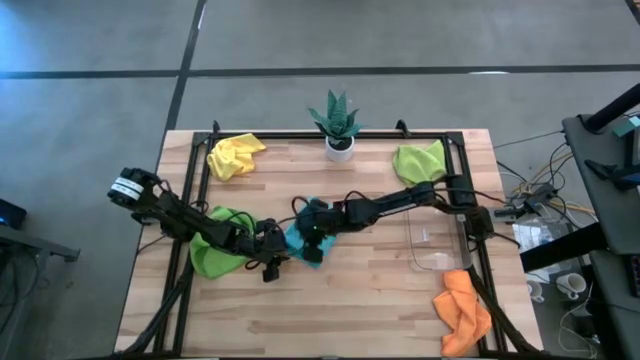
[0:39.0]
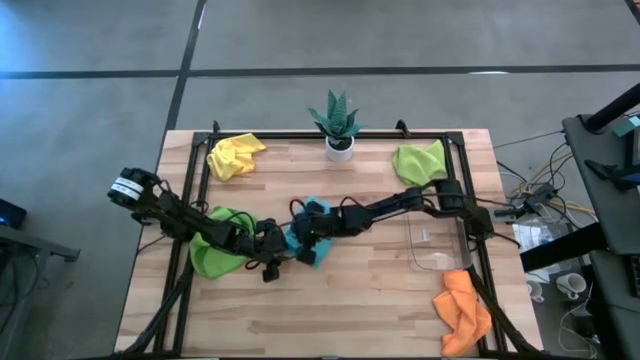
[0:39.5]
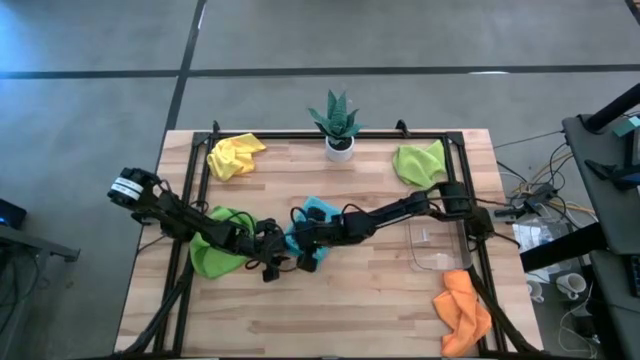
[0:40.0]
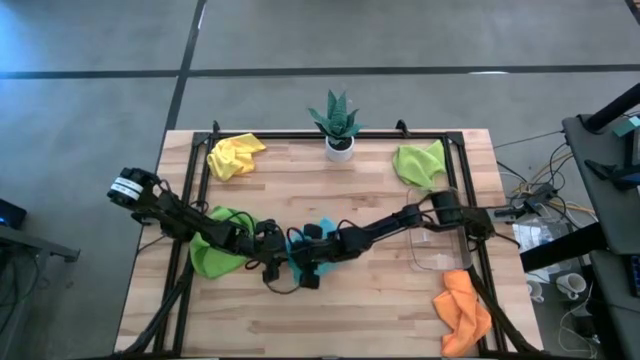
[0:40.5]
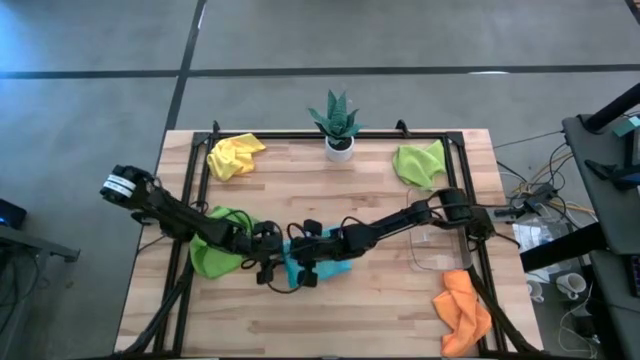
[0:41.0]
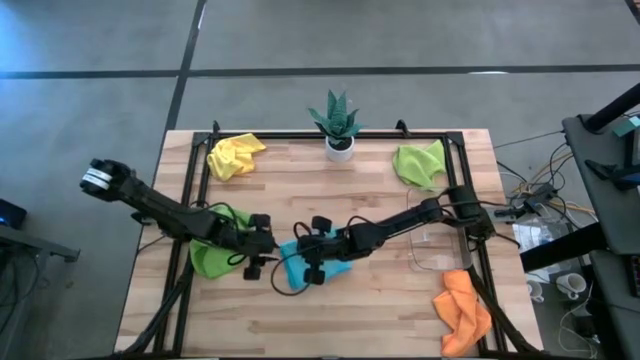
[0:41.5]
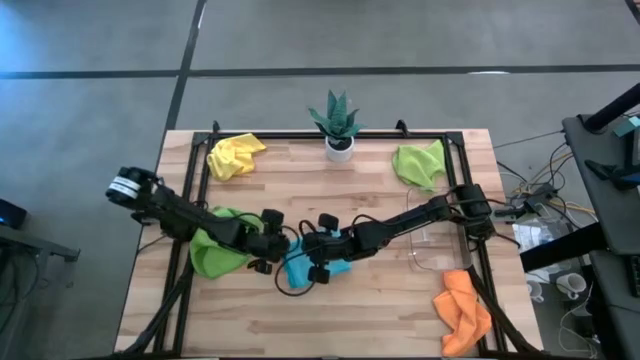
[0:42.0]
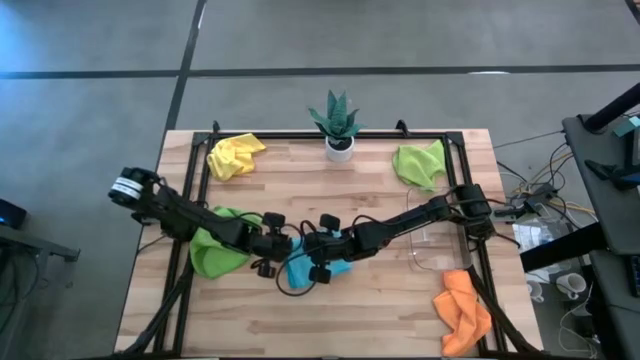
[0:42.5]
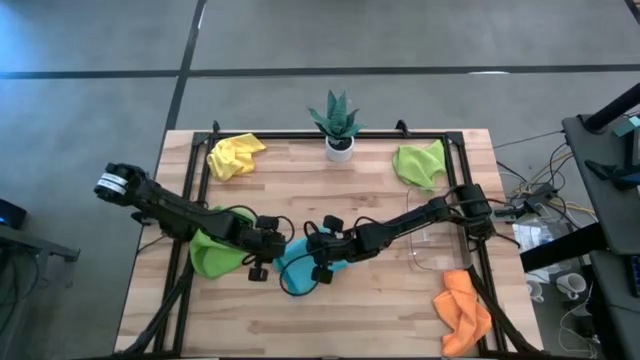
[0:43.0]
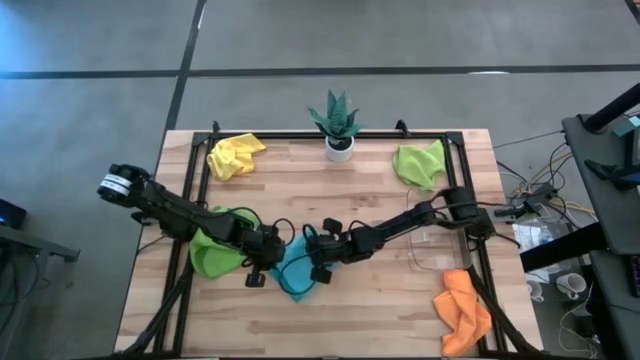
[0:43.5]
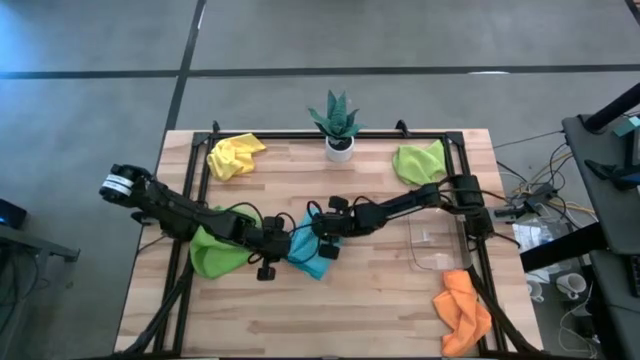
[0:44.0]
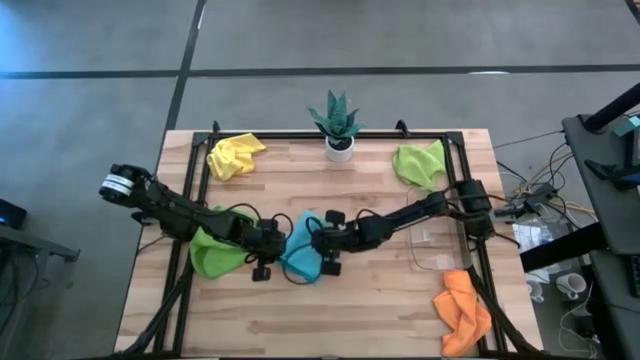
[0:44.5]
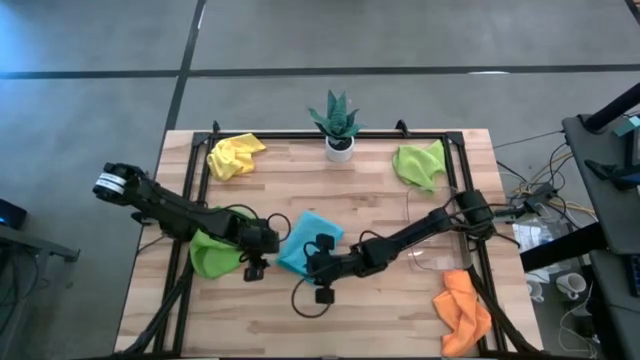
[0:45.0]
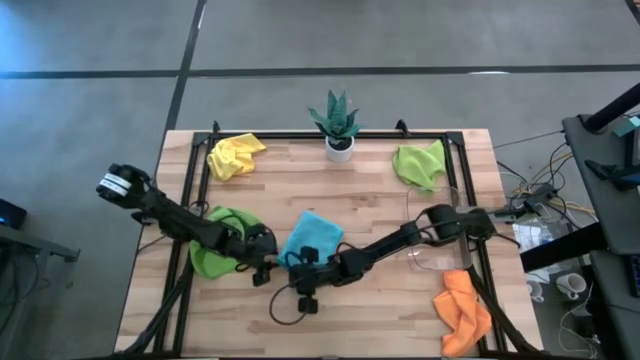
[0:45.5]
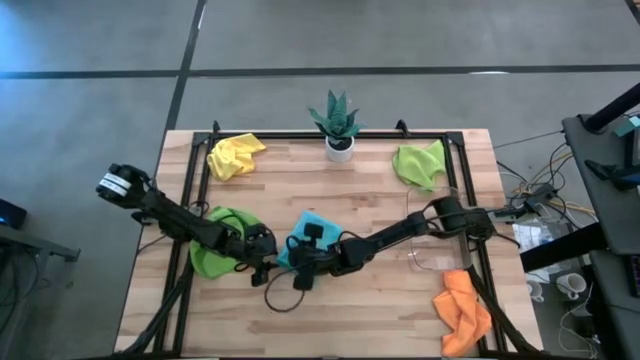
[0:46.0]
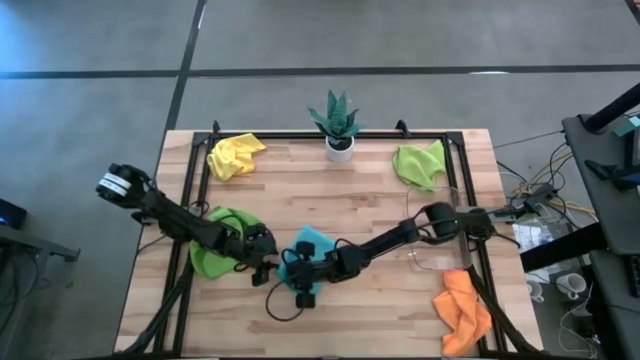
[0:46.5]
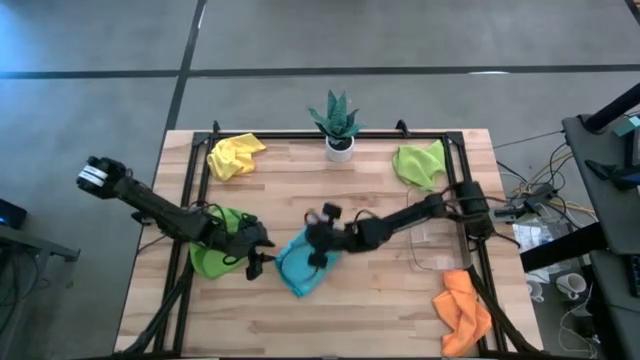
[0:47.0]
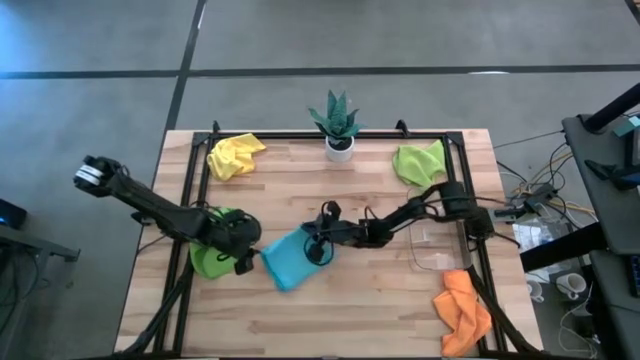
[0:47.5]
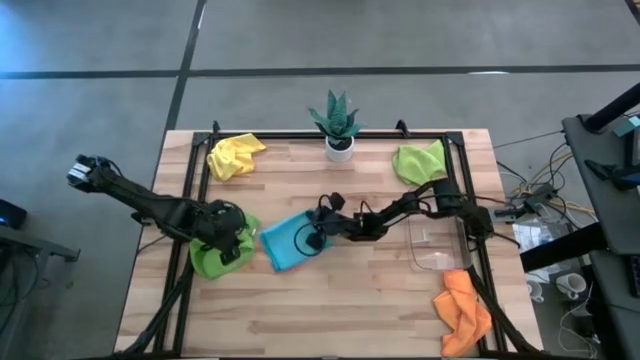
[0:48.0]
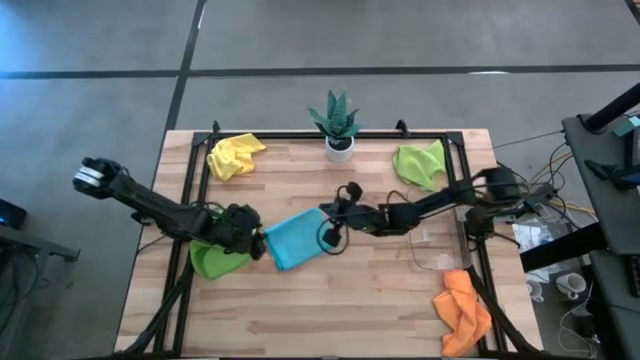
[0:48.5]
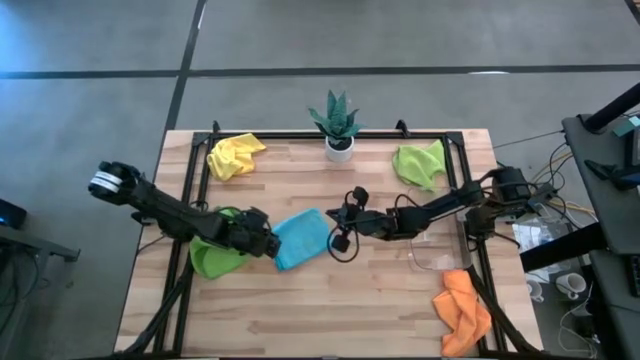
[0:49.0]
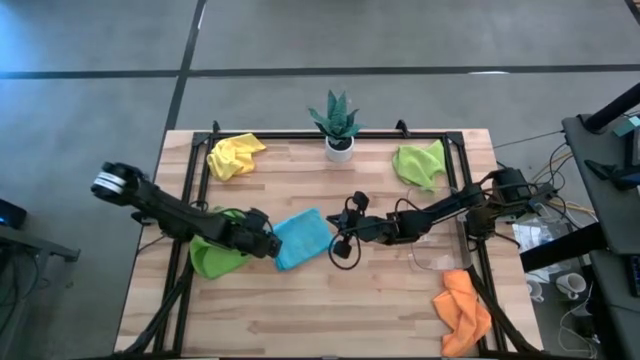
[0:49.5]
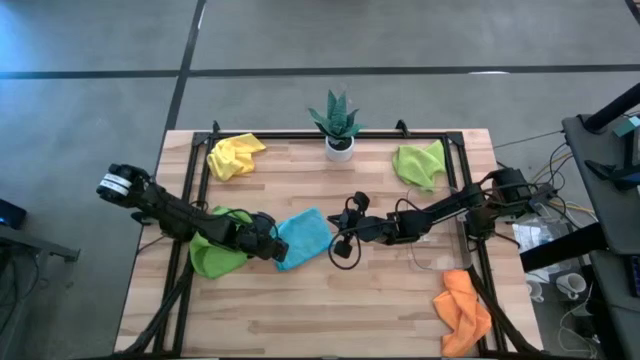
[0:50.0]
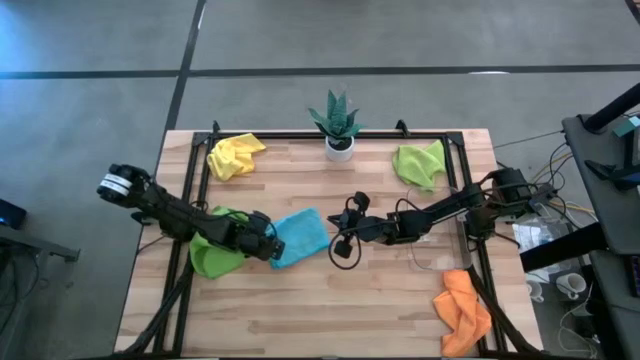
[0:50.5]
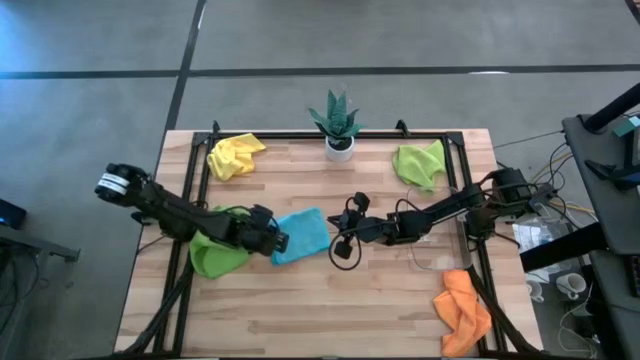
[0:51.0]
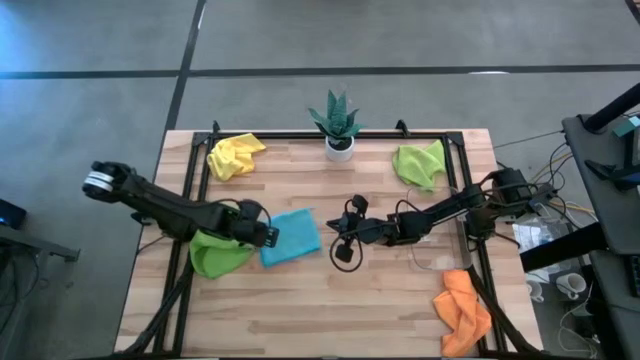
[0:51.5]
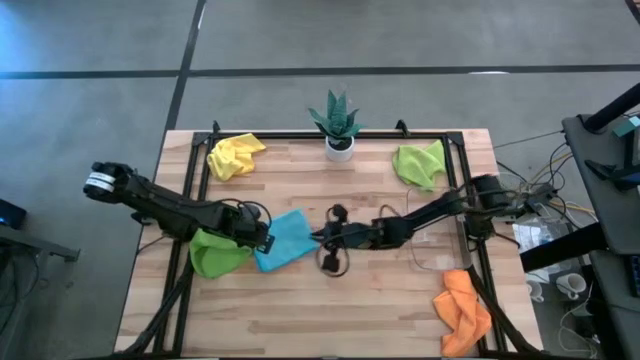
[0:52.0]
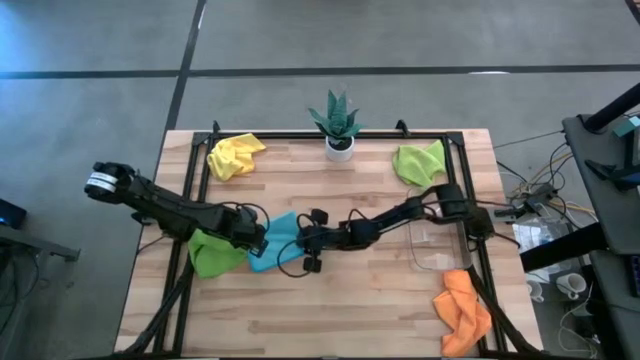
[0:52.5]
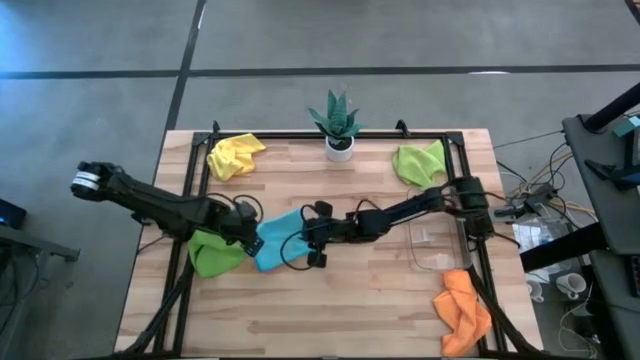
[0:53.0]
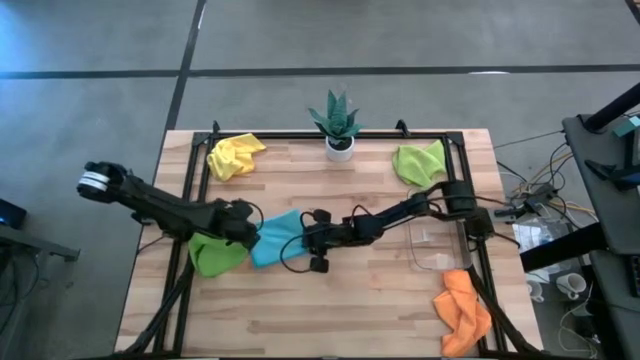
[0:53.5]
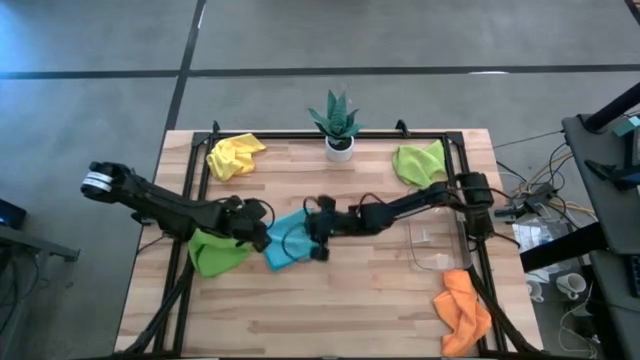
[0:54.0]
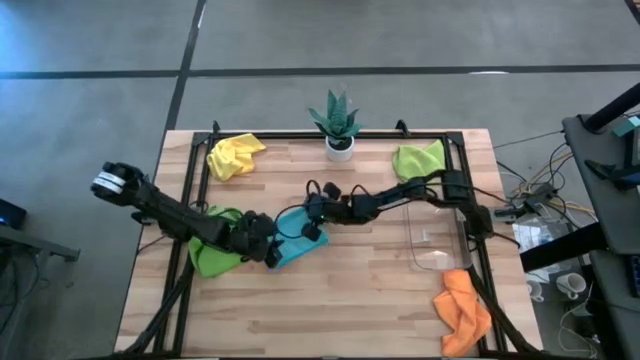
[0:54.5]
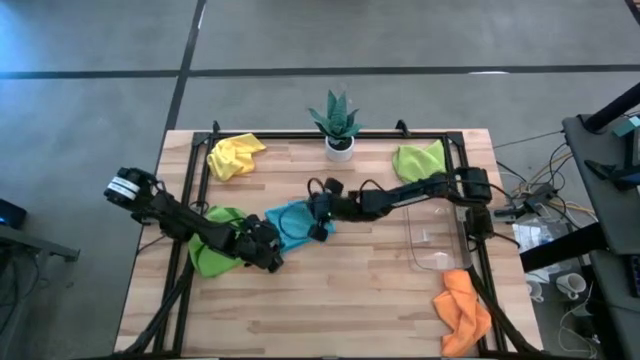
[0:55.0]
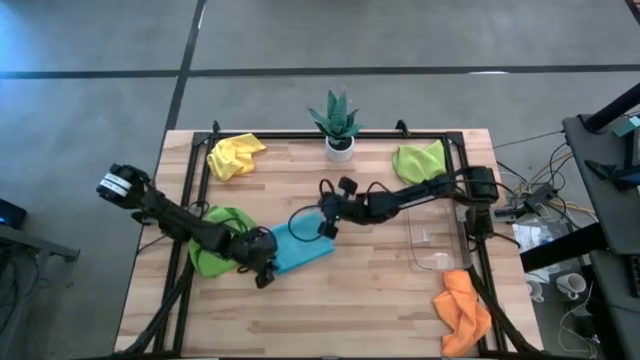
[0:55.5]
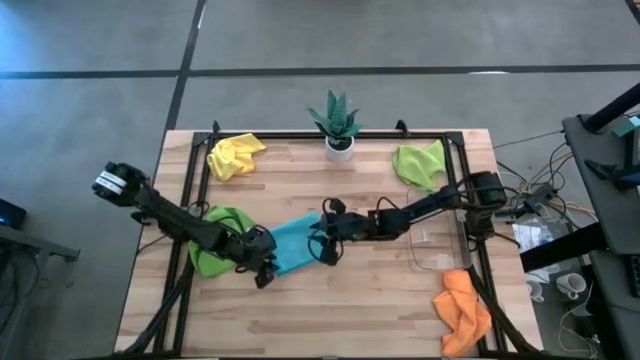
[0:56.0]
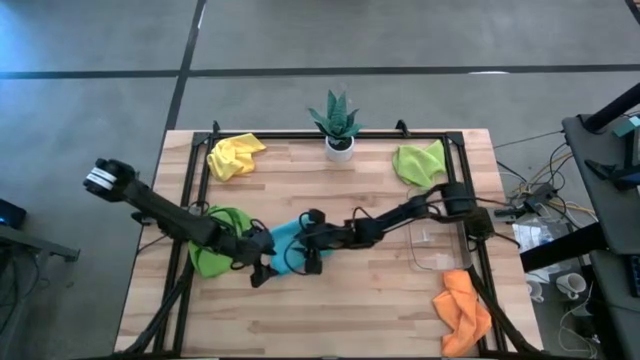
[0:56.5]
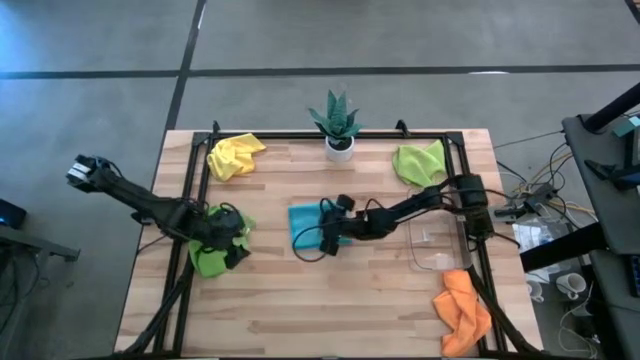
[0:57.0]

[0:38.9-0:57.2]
Task: Fold microfiber towels
Fold the blue towel on the table

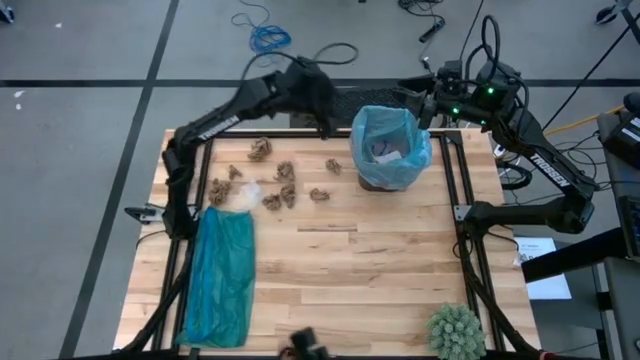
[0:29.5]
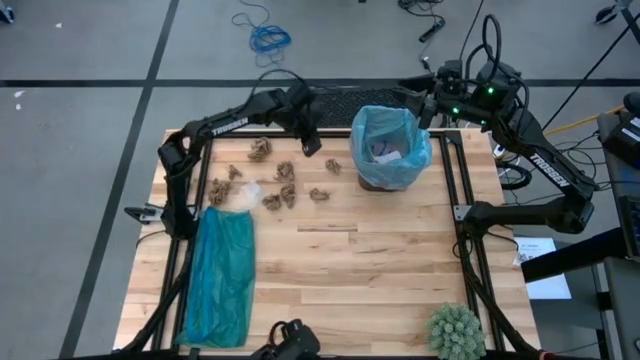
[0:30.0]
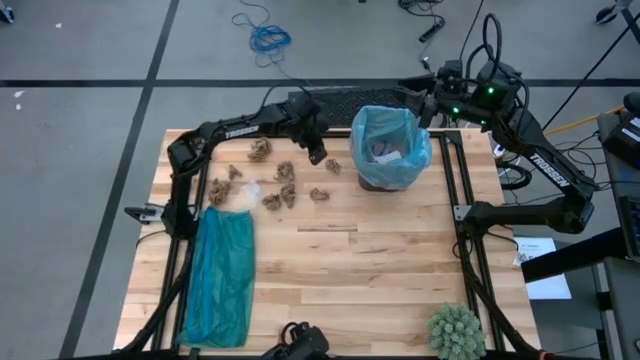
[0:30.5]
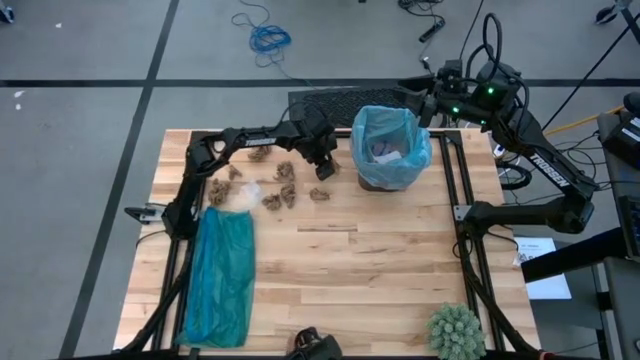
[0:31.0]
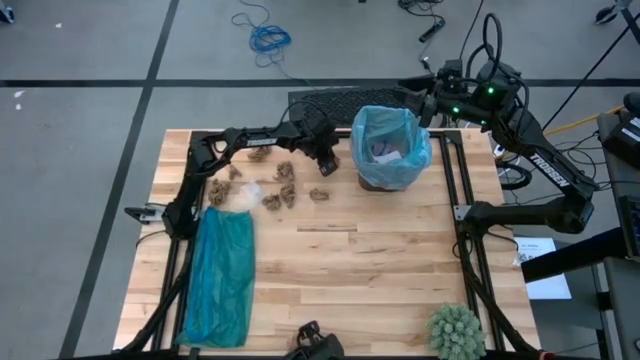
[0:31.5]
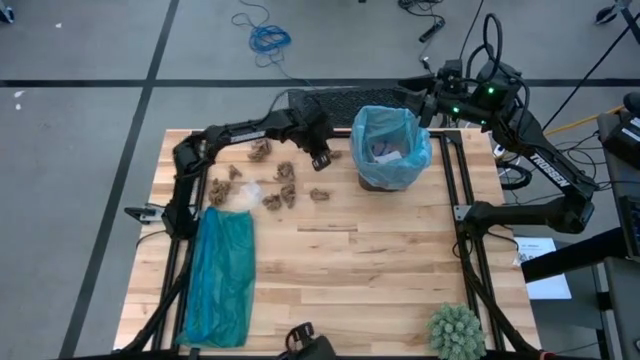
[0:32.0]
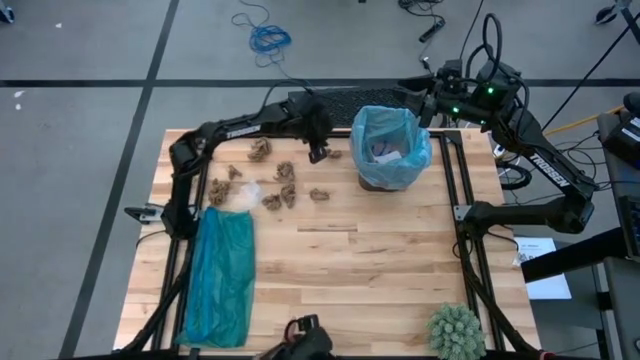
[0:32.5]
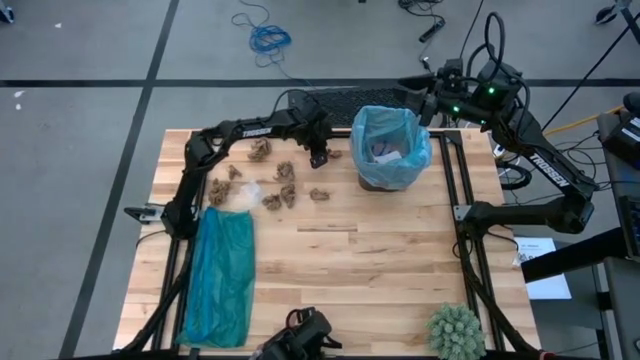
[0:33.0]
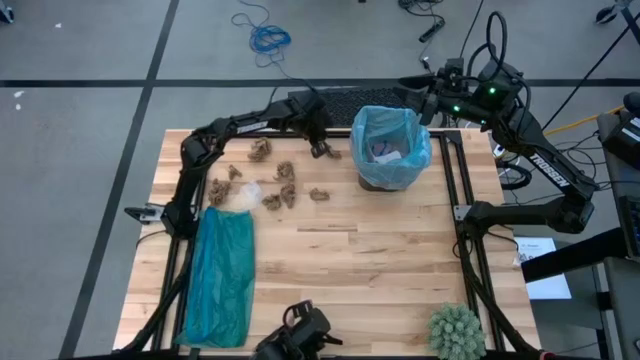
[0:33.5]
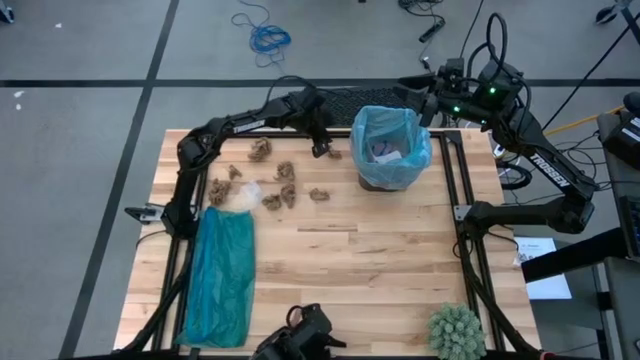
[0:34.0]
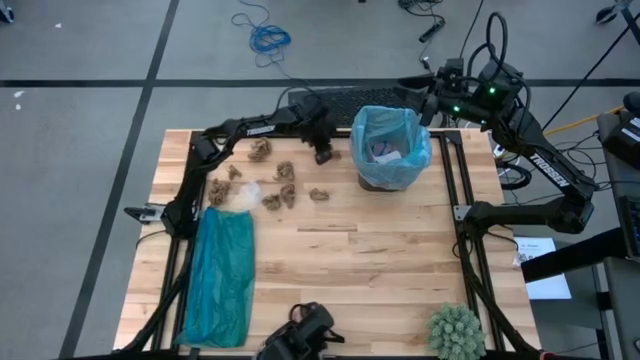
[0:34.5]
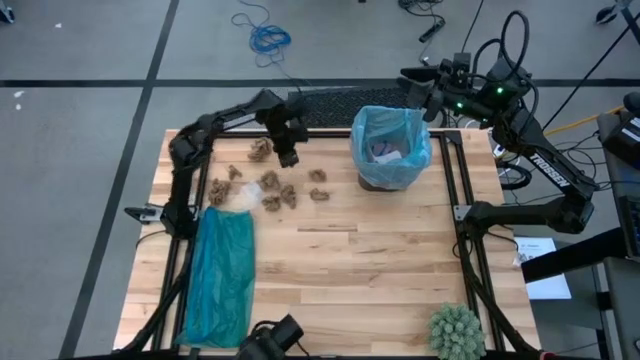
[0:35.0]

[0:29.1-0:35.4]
Task: place trash/remove bag and relplace
Put the brown tissue into the trash bin
